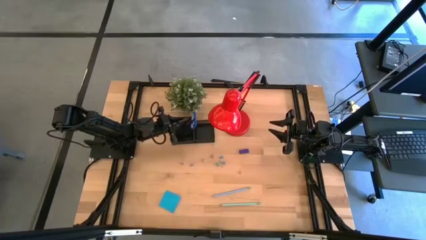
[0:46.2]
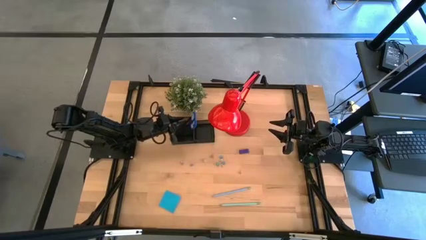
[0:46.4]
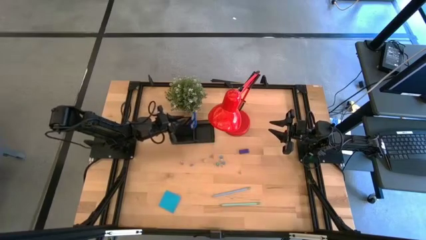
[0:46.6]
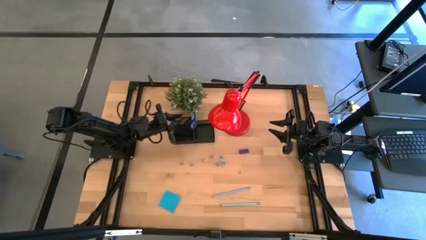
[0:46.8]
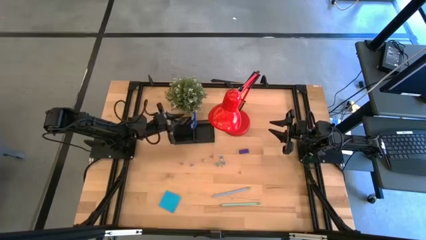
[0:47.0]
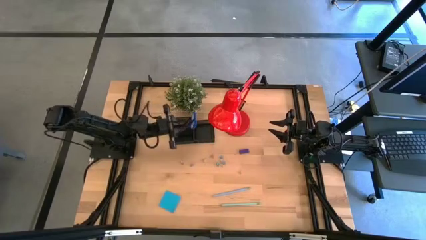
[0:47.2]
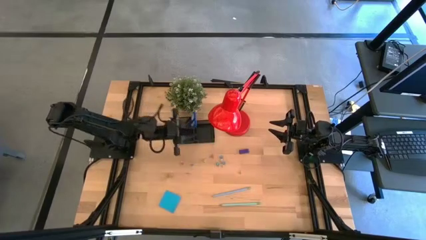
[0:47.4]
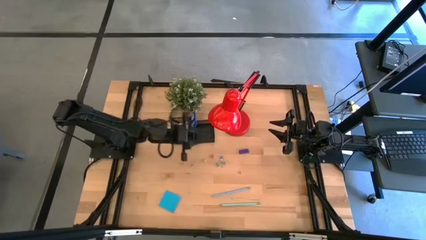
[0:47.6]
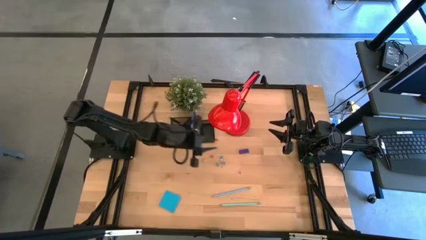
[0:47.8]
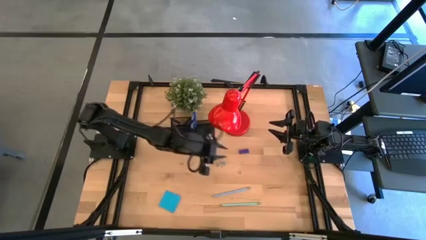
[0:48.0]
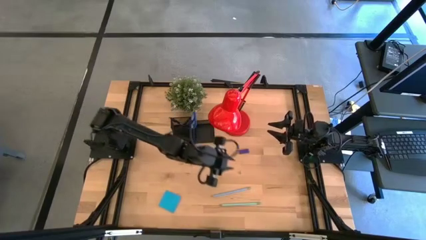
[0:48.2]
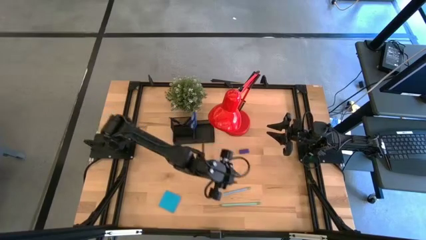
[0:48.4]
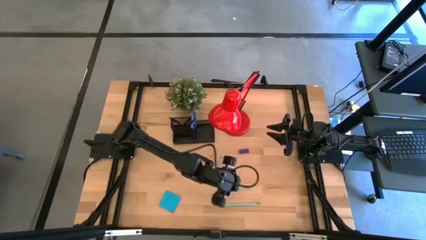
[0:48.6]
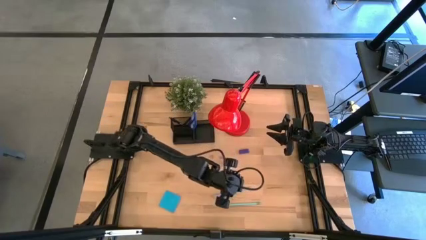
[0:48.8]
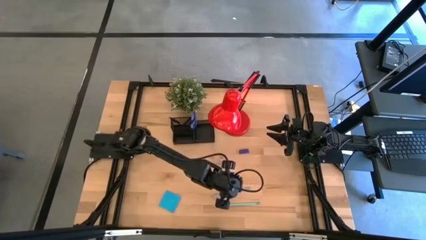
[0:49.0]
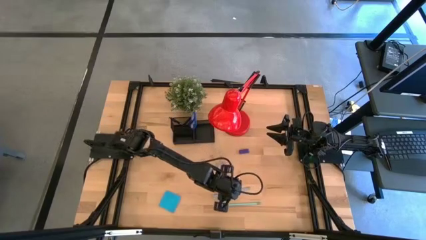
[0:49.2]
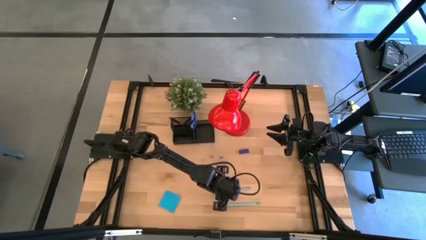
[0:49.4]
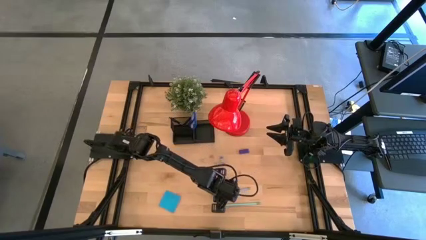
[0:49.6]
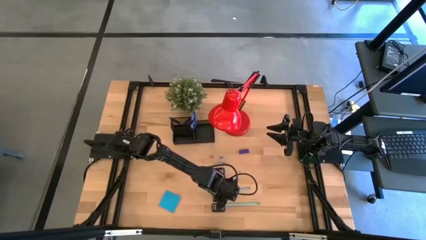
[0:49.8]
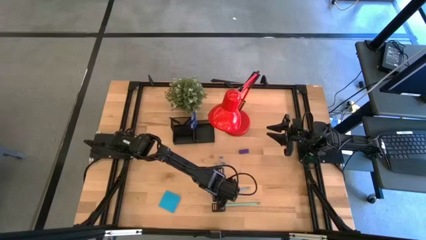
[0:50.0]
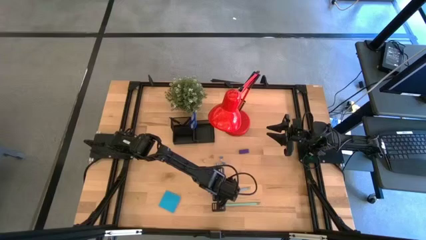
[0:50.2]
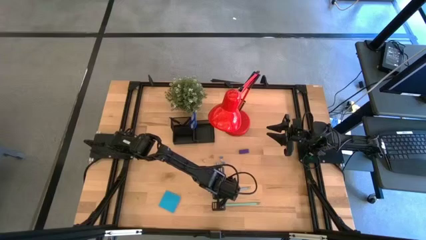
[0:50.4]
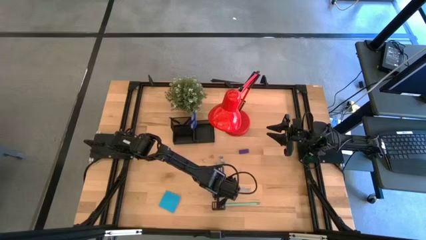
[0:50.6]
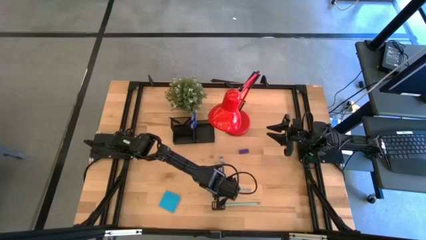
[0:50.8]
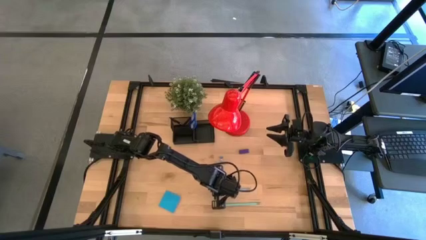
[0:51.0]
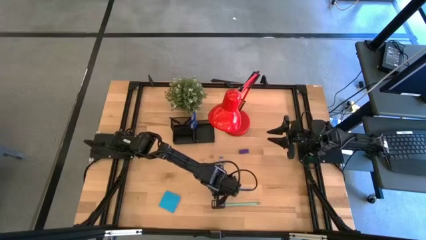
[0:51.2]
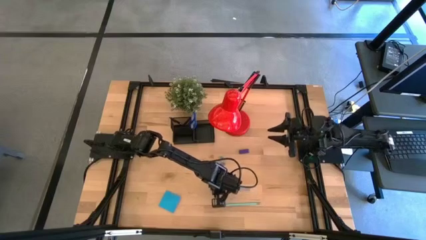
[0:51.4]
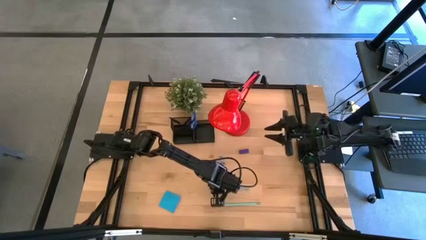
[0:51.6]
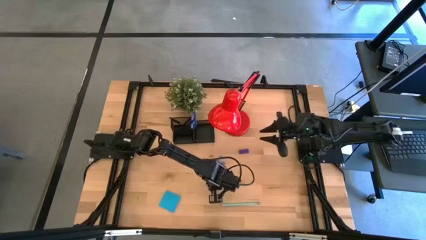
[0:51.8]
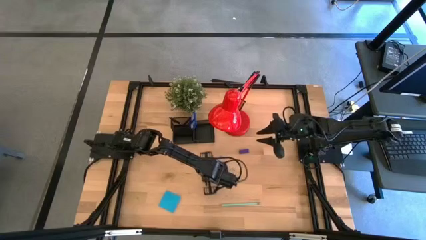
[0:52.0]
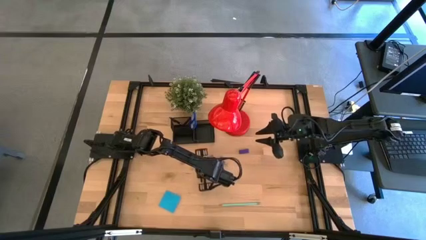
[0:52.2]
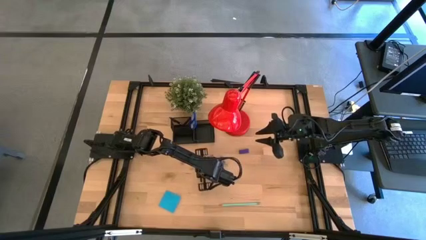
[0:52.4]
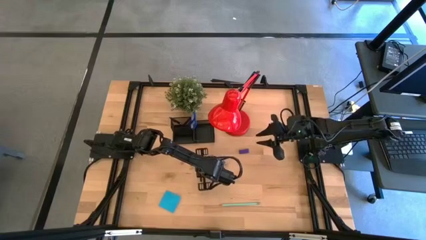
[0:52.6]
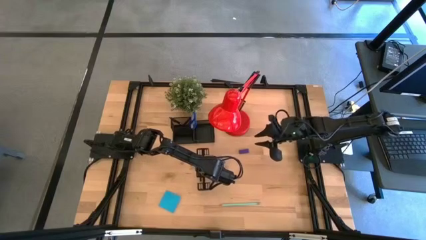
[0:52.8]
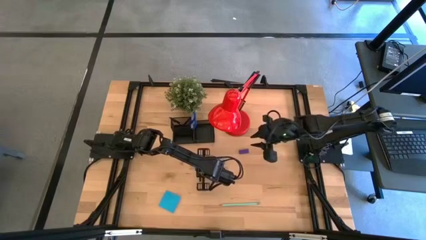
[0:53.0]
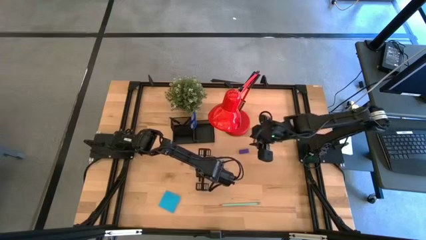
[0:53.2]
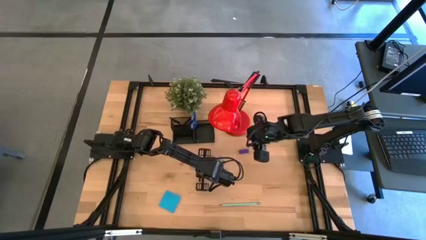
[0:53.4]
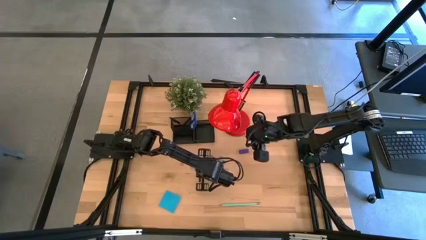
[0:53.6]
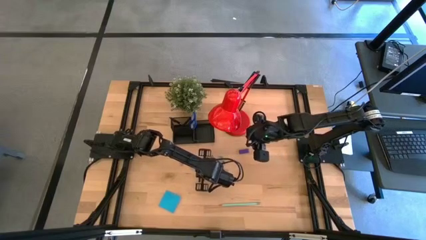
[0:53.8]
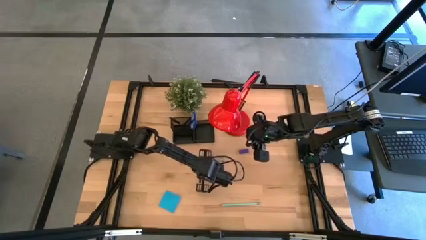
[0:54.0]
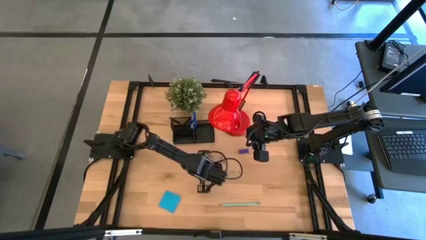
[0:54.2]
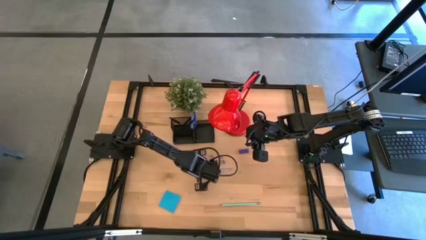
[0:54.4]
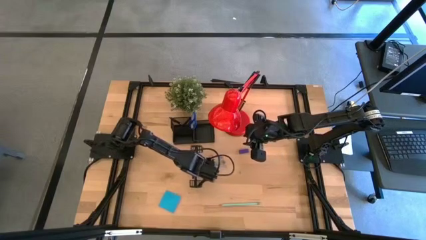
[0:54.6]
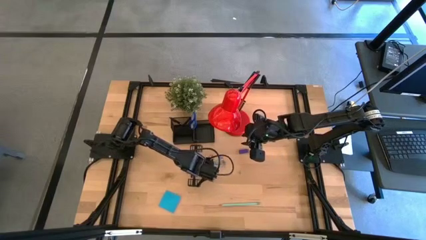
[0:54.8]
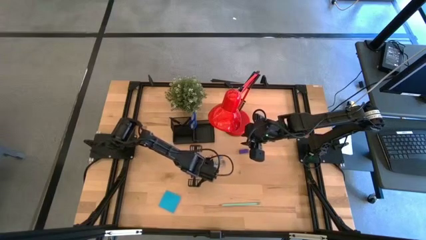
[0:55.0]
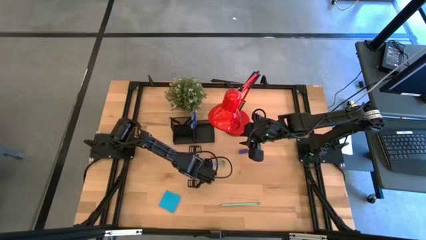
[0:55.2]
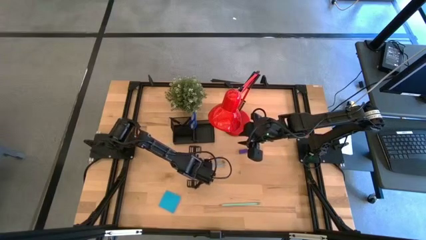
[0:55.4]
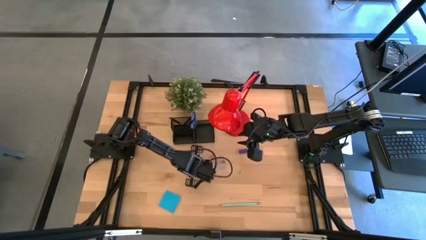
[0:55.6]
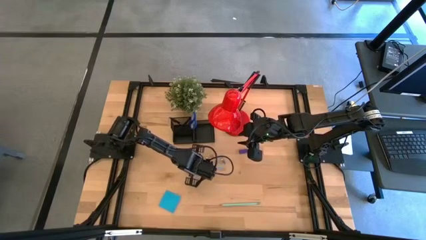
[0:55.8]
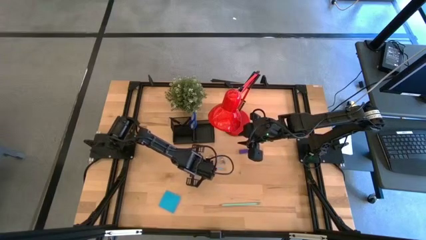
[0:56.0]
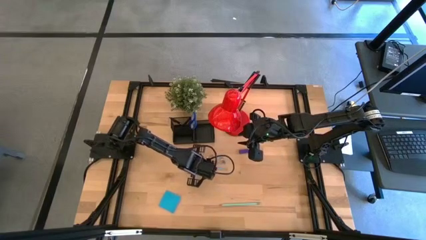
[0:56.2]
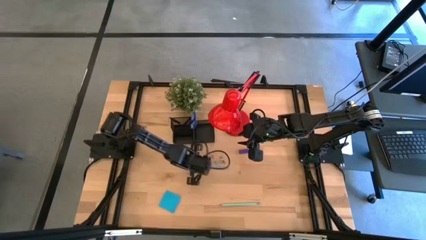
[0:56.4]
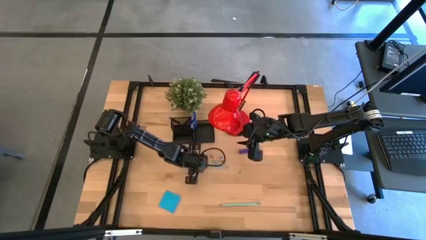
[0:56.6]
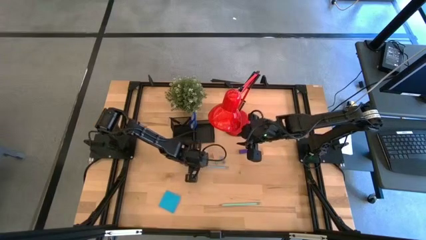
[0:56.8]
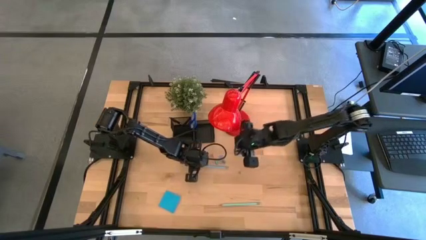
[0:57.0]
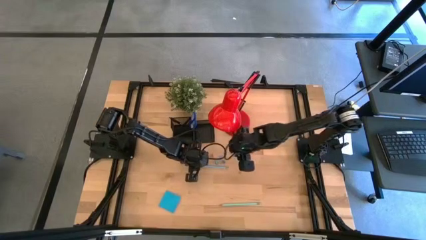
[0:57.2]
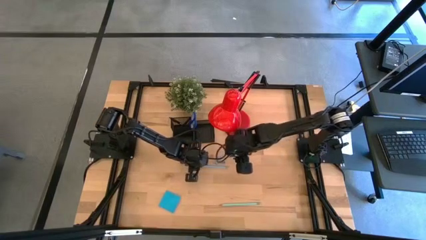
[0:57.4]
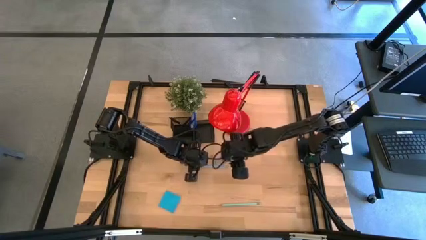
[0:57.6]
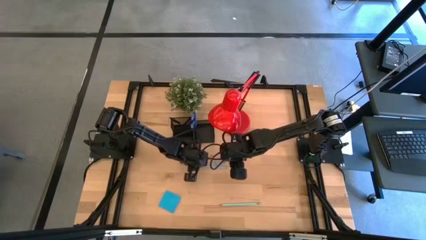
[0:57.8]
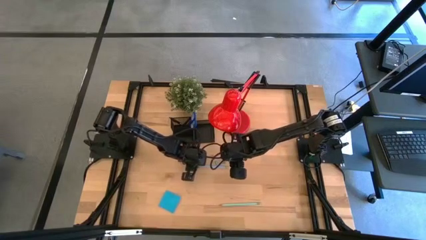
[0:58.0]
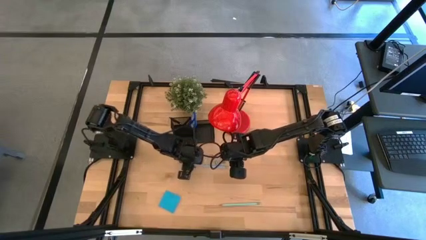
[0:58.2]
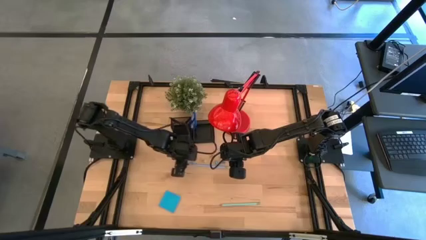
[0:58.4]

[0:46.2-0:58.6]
Task: Pick and place office supplies into organizer
Put the blue pencil into the black desk organizer
